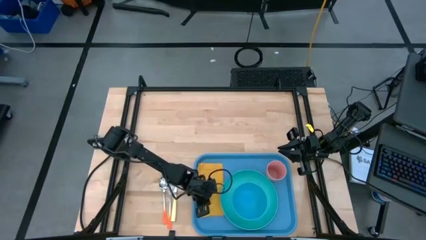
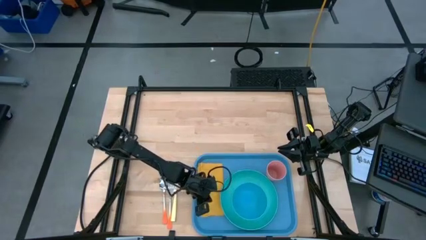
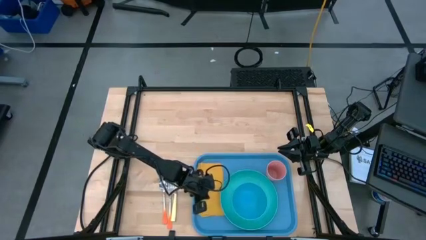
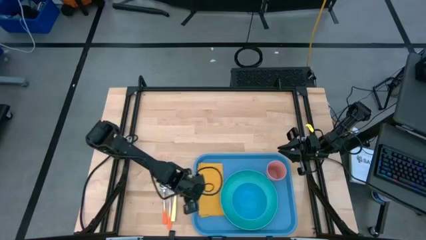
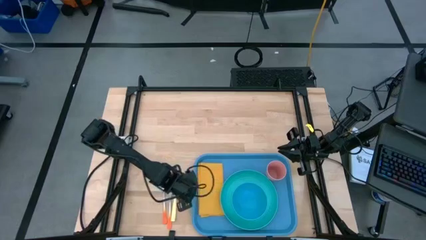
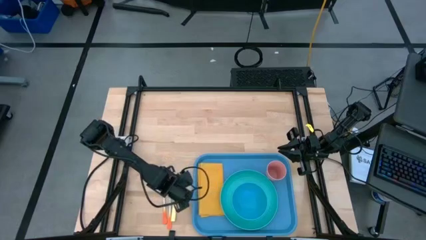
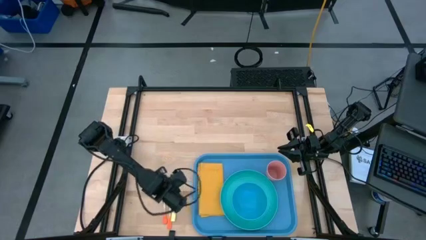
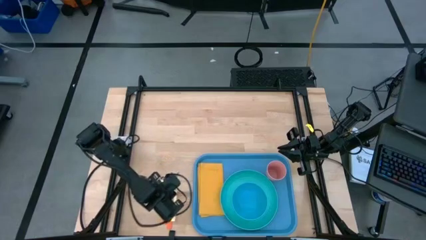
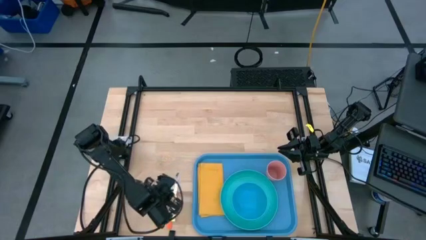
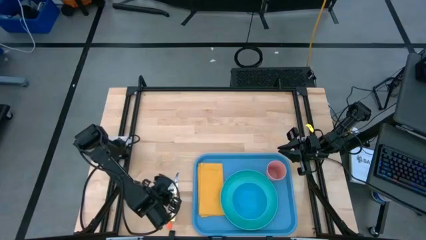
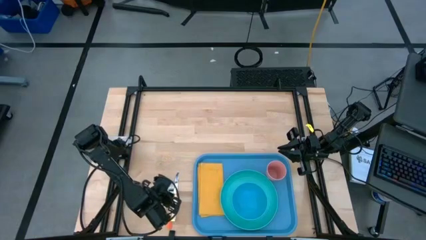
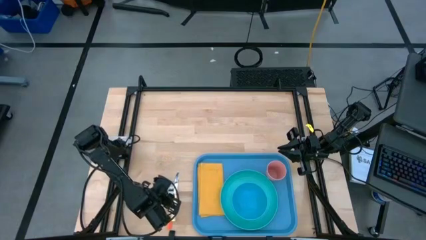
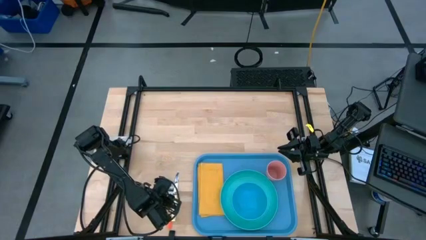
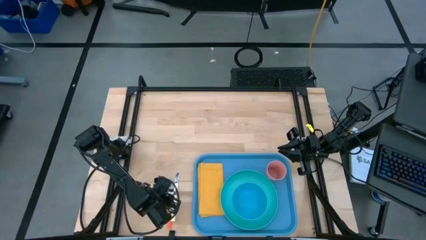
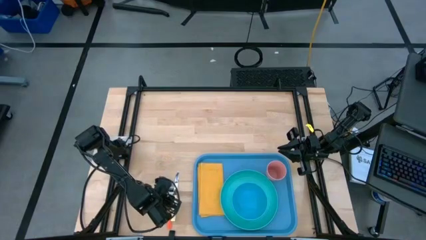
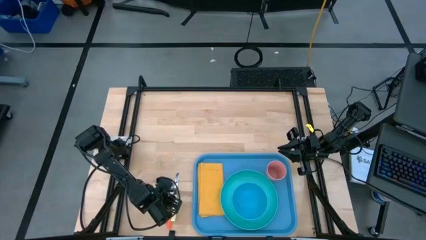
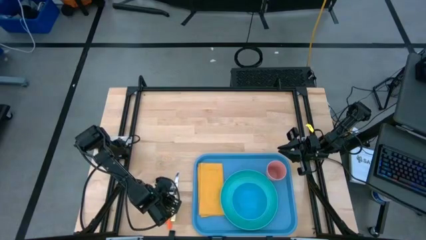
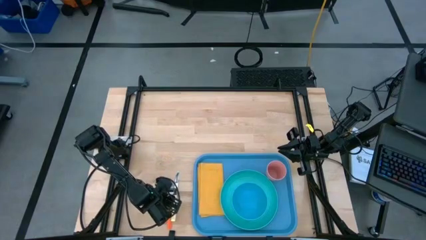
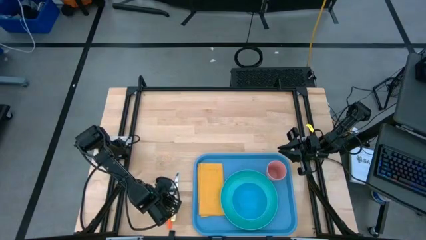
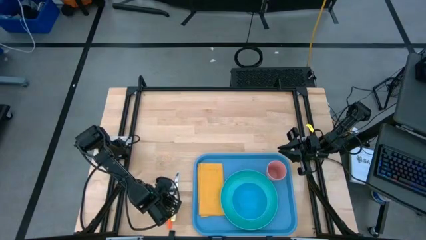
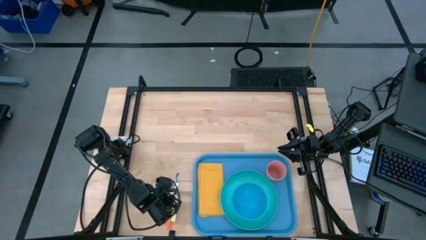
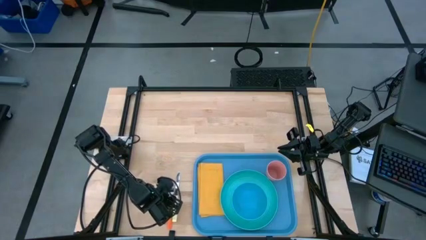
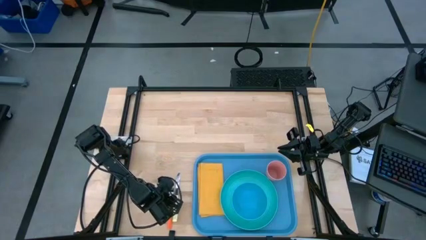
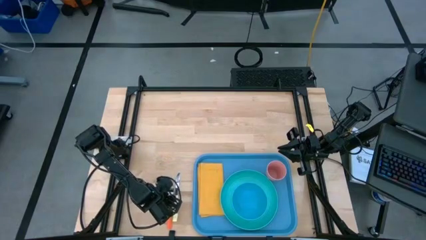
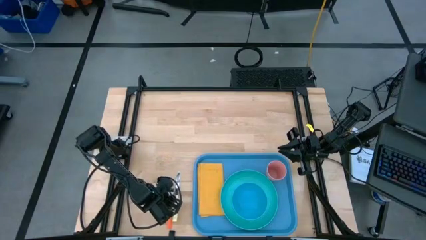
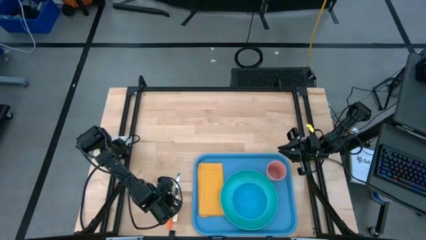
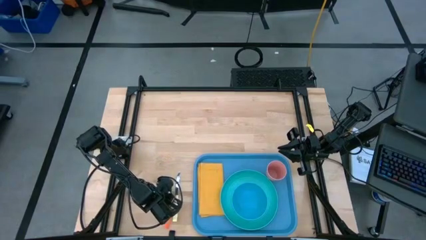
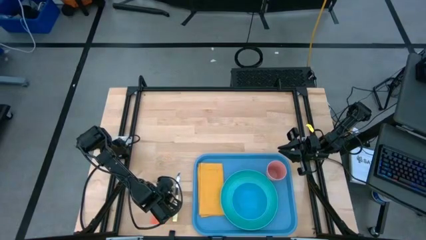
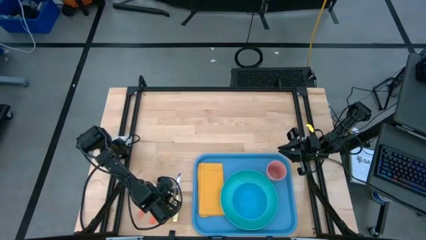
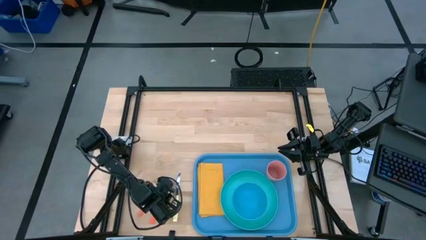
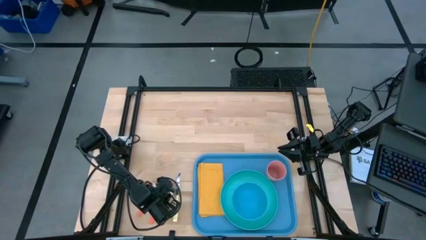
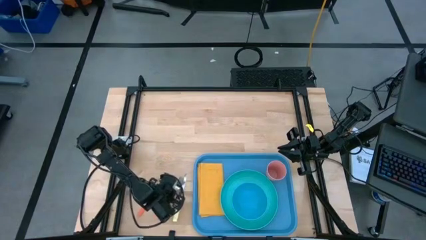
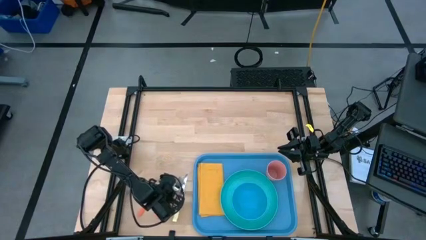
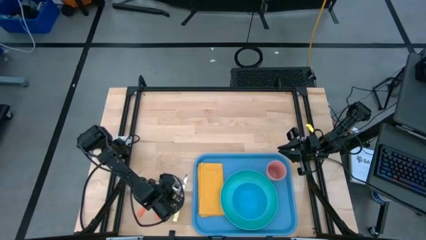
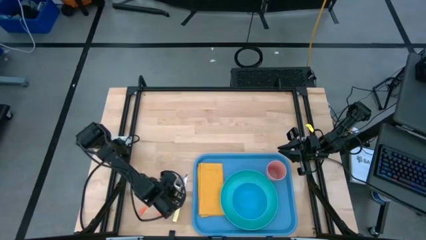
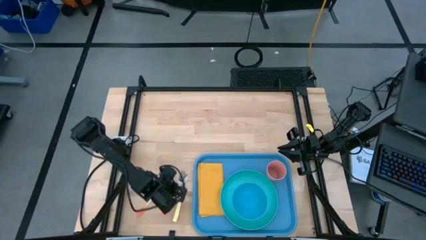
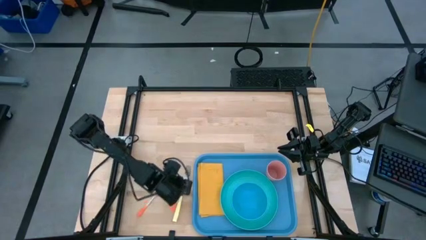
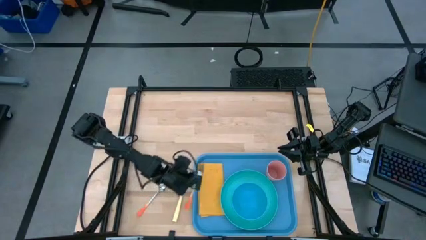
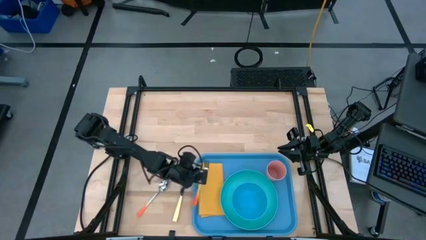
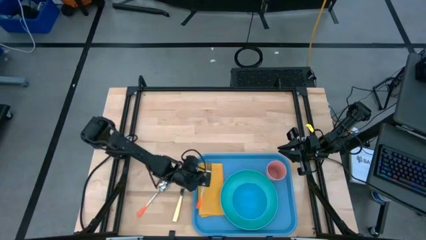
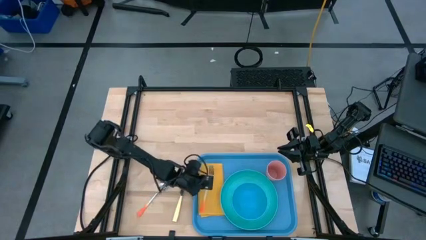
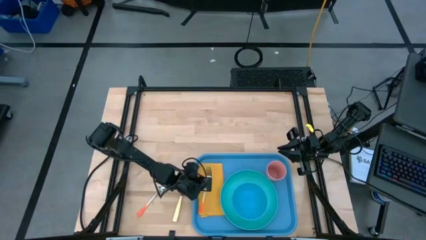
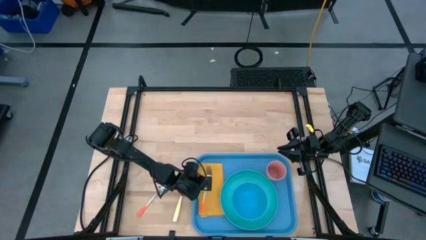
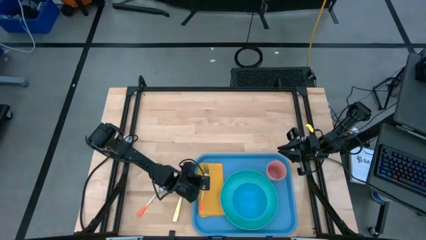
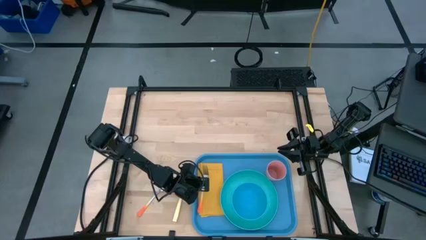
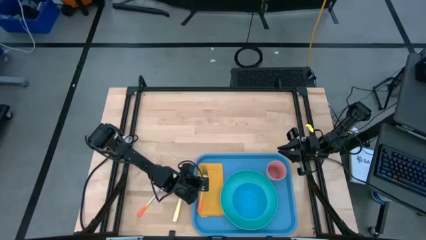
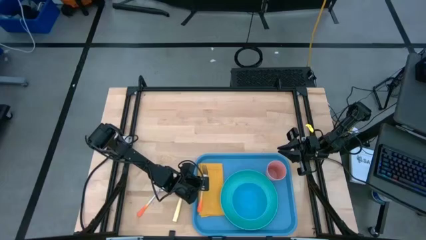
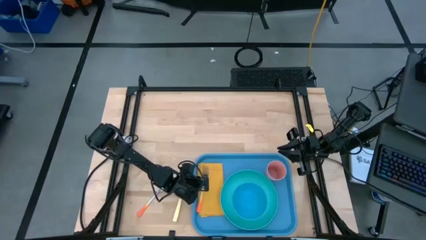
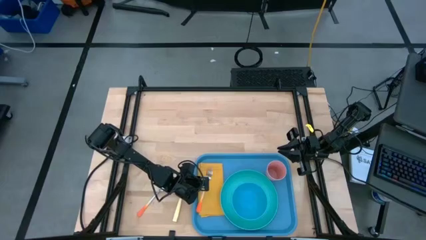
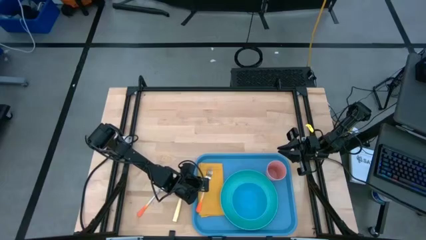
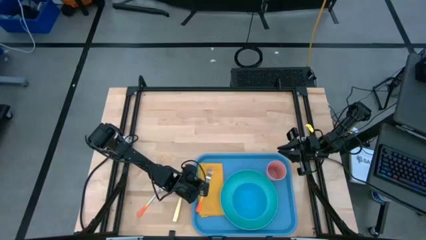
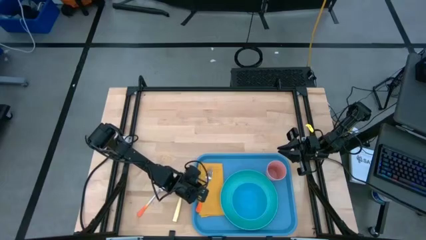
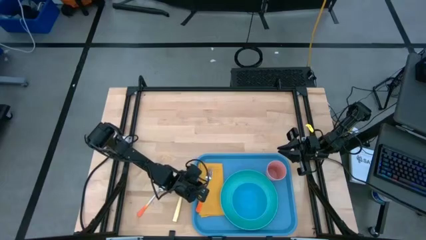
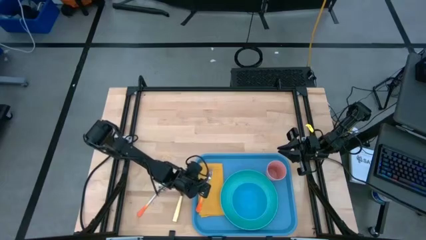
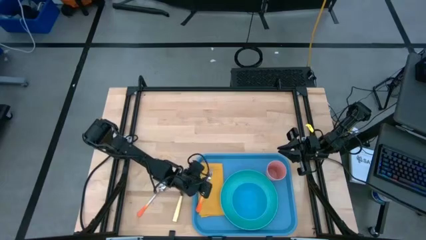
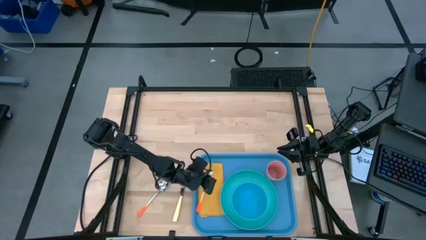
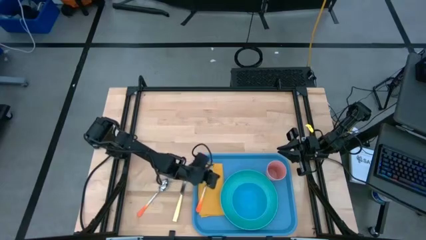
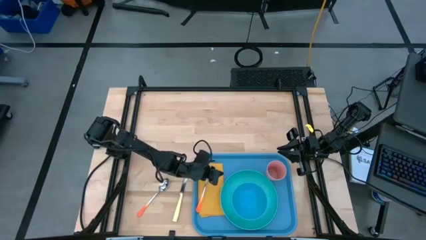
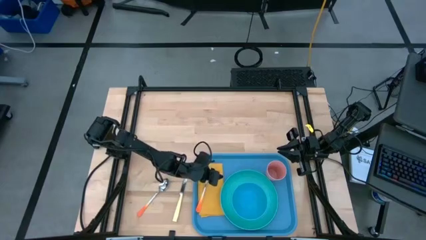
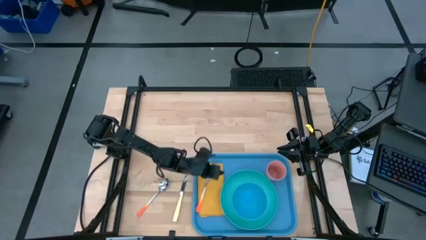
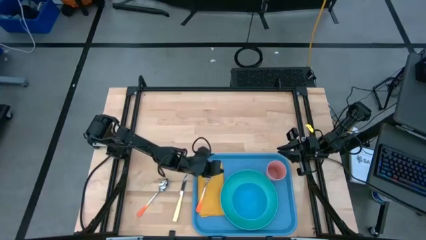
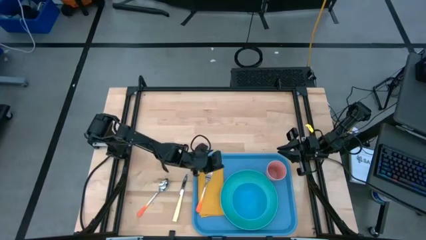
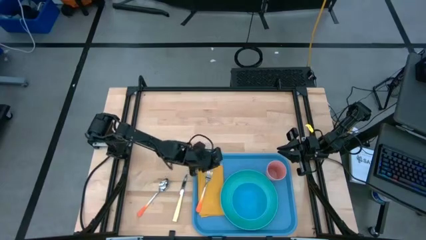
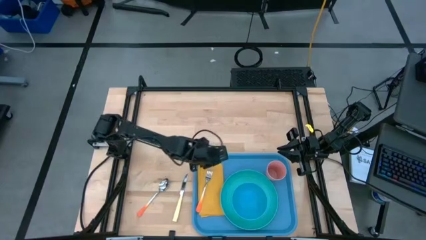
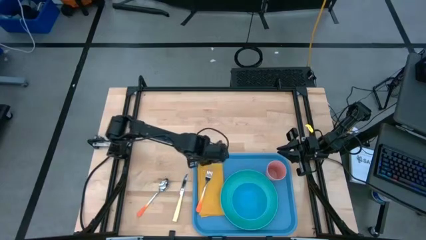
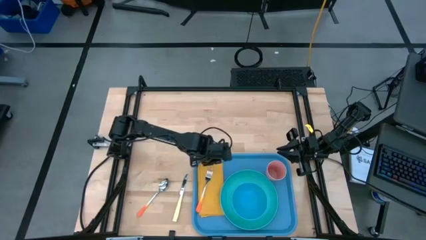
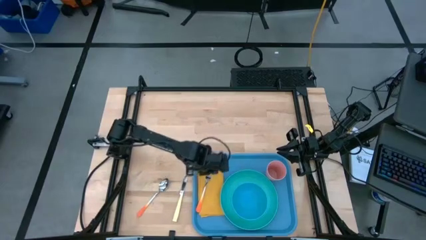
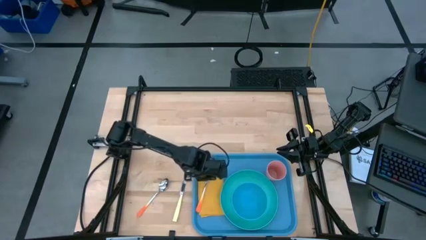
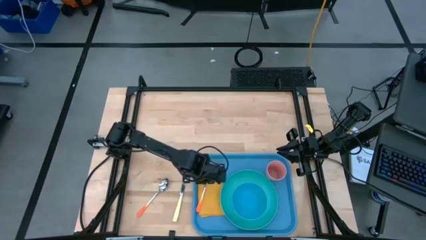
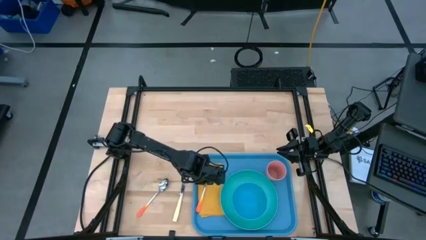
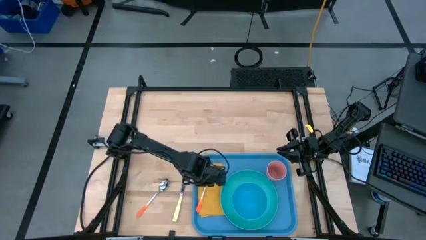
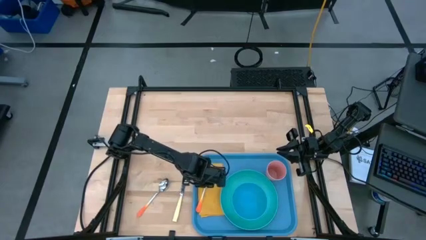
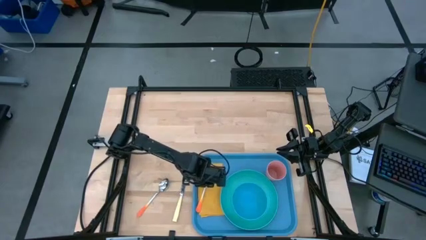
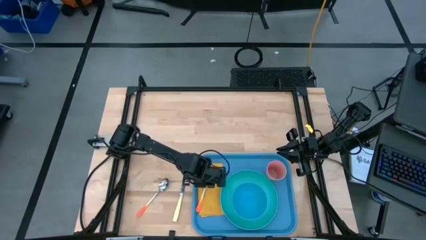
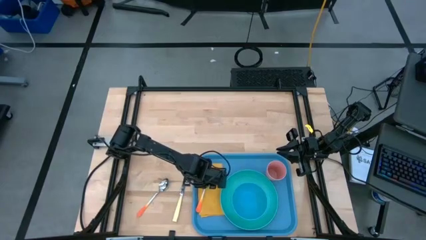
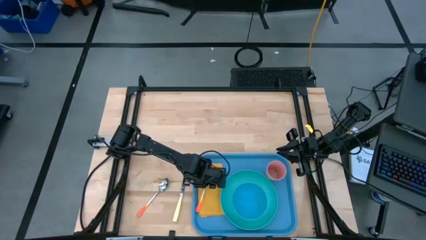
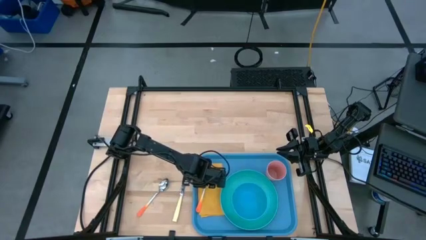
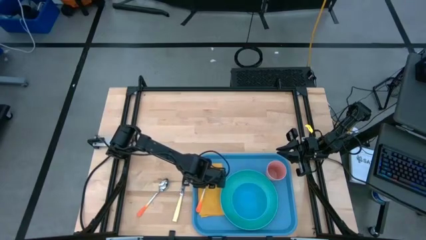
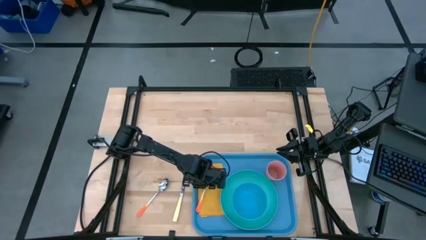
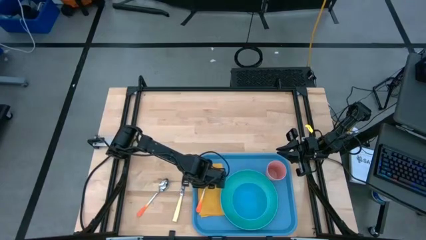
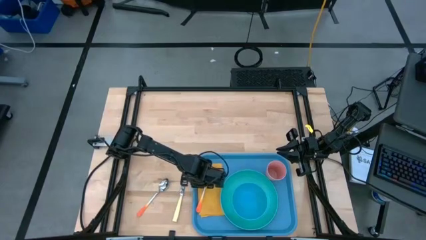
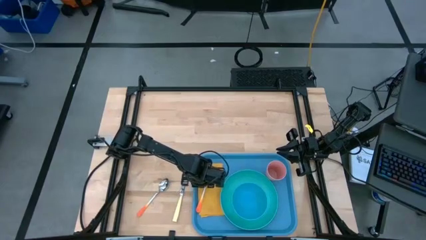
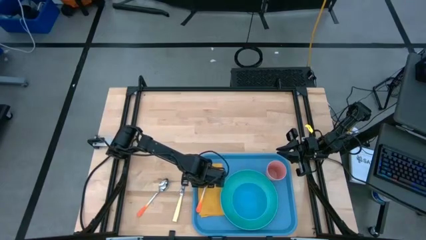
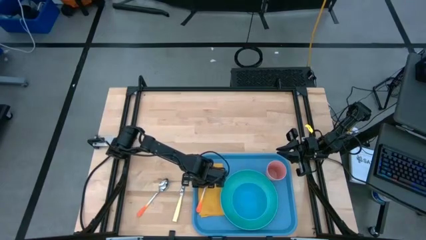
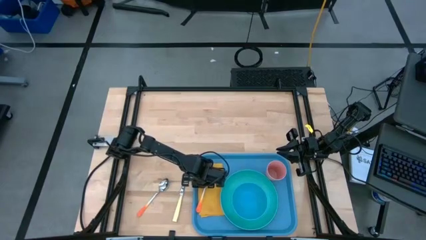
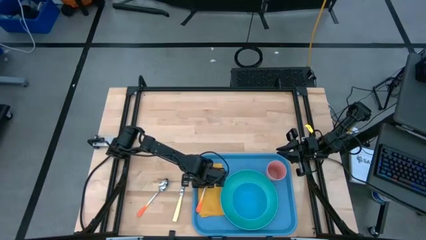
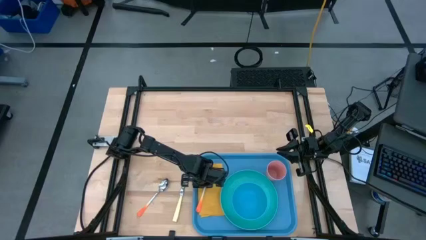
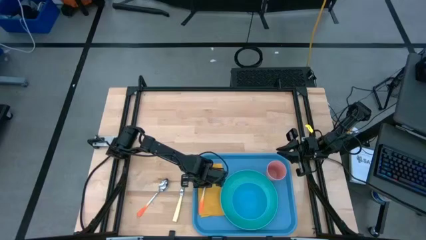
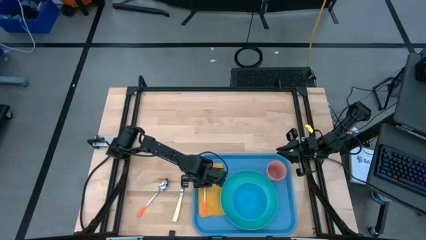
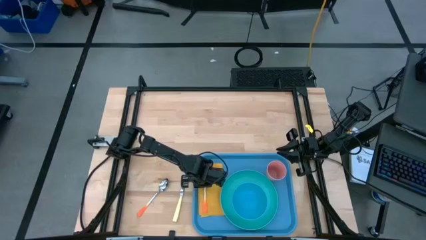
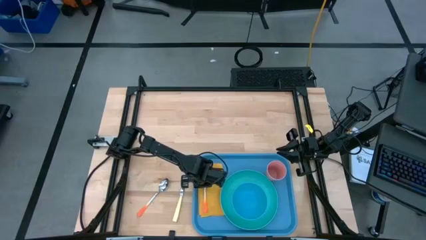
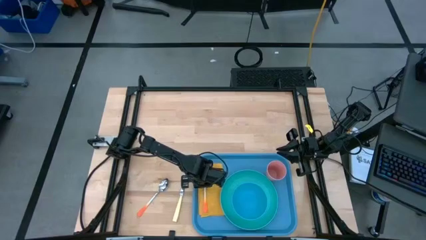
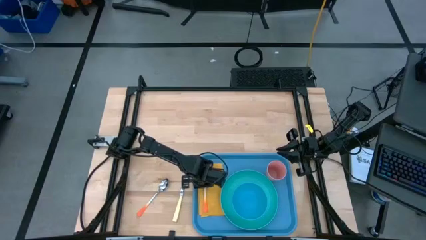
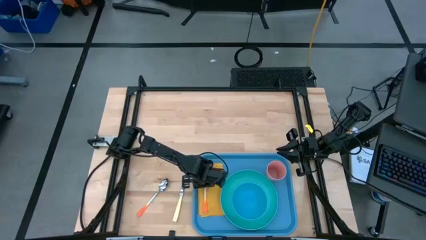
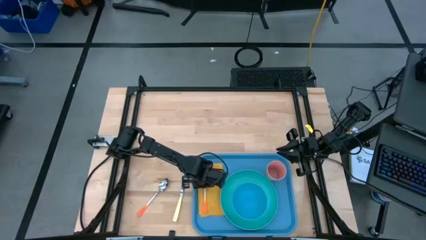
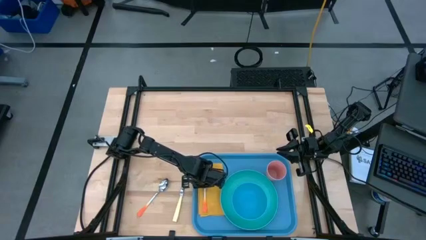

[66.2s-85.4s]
Task: Set up tray
Put the orange fork on top of the yellow table napkin
